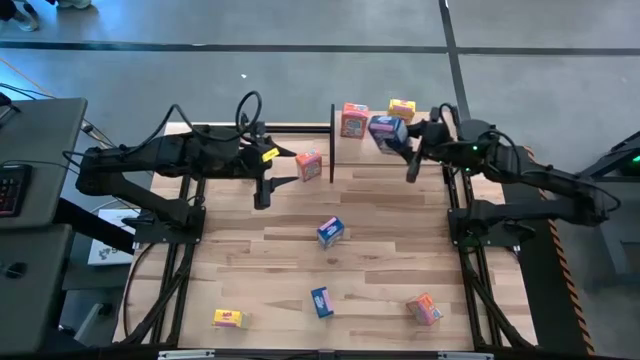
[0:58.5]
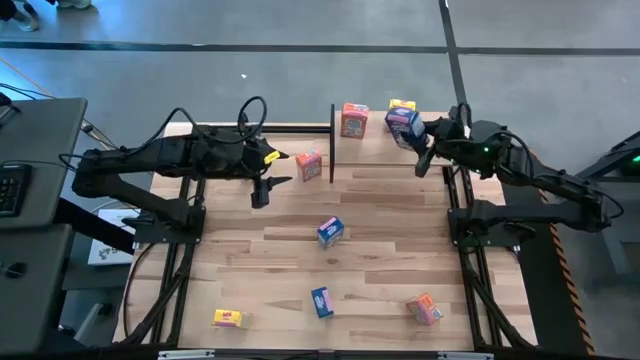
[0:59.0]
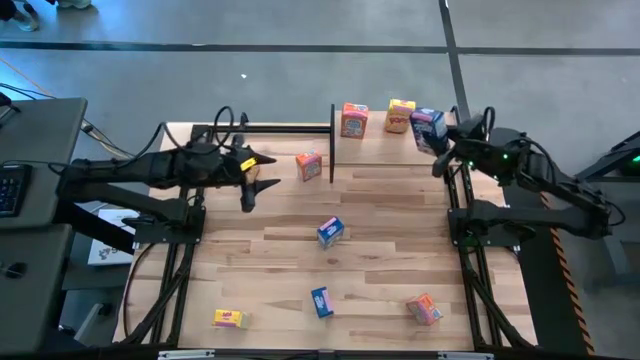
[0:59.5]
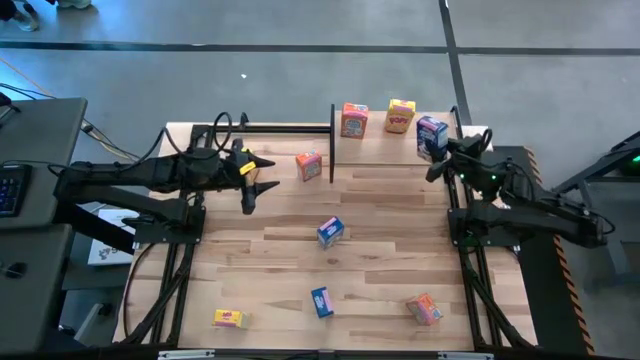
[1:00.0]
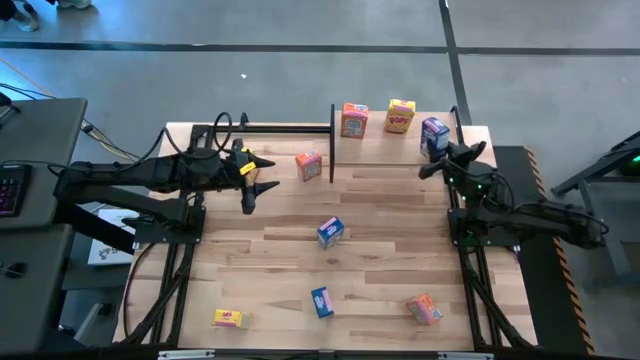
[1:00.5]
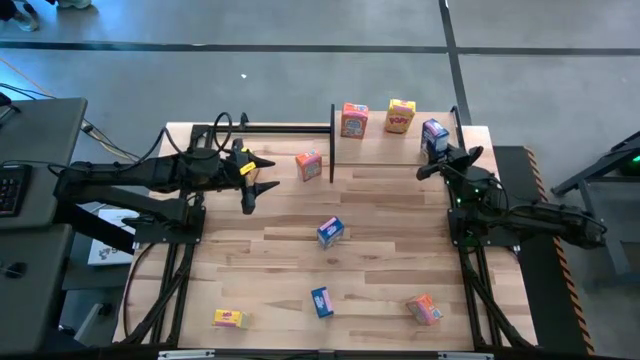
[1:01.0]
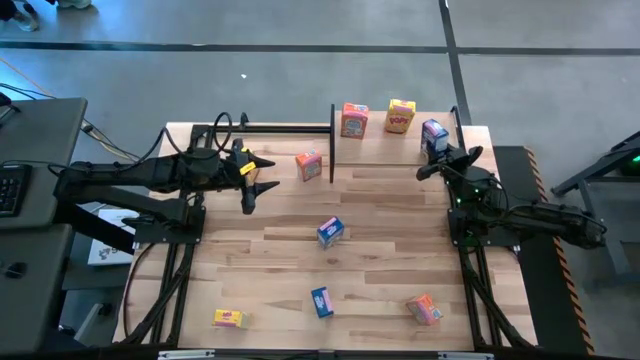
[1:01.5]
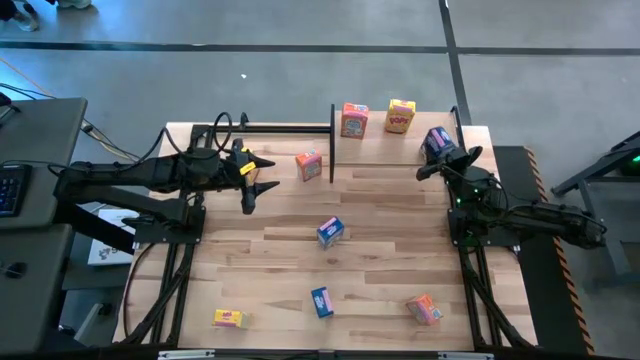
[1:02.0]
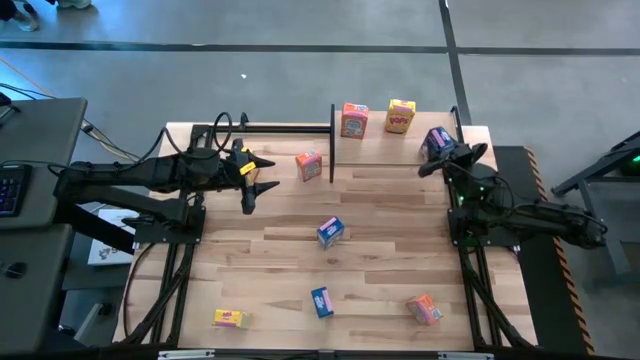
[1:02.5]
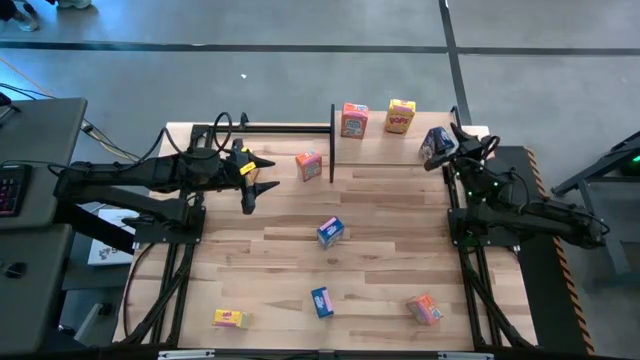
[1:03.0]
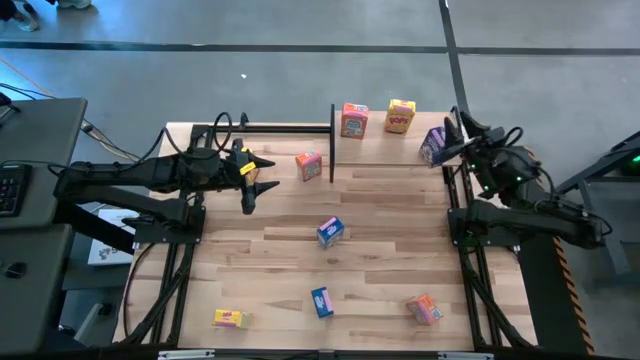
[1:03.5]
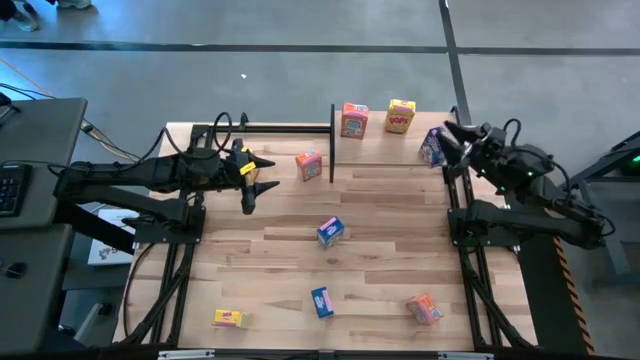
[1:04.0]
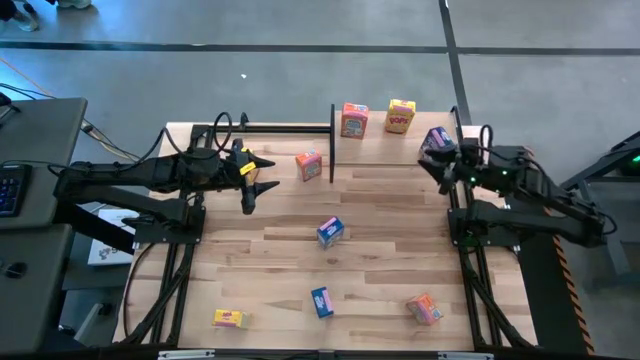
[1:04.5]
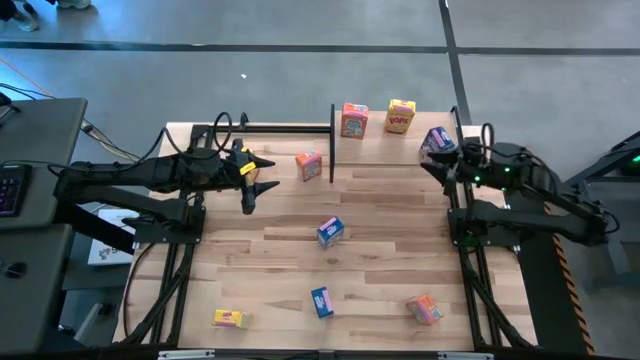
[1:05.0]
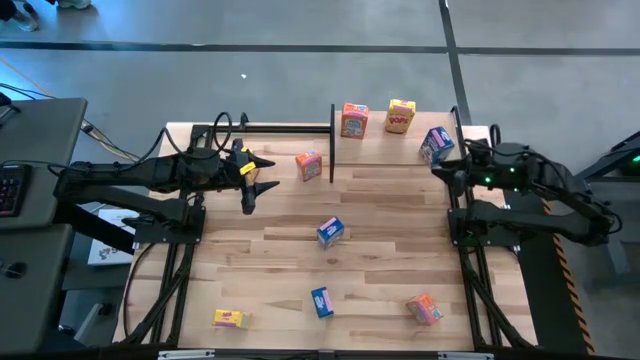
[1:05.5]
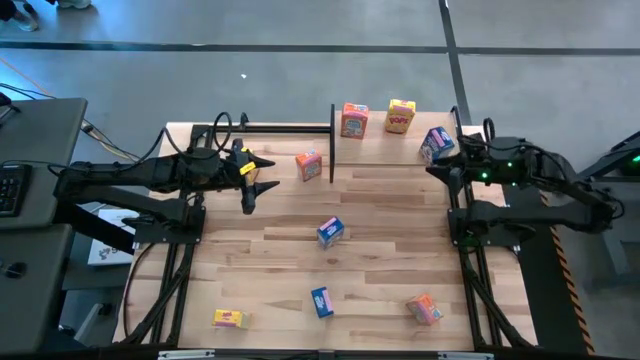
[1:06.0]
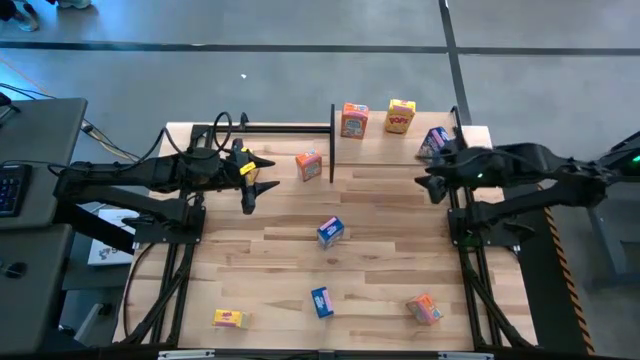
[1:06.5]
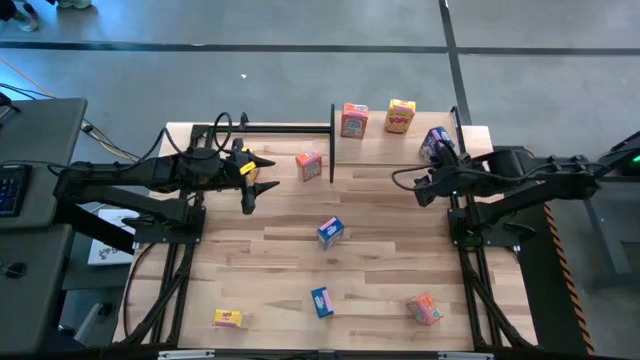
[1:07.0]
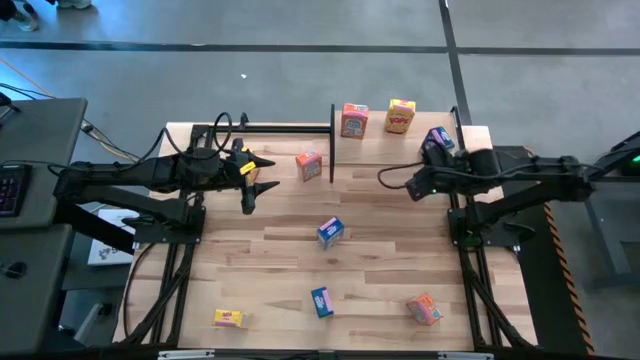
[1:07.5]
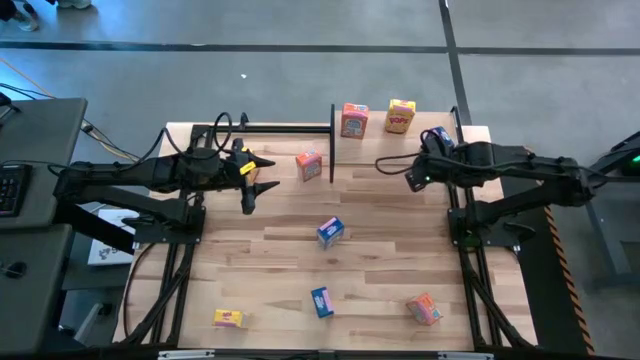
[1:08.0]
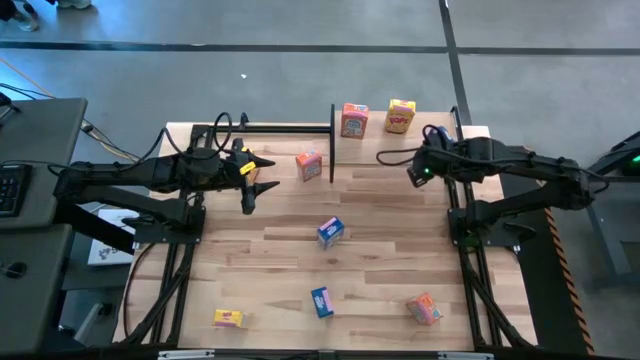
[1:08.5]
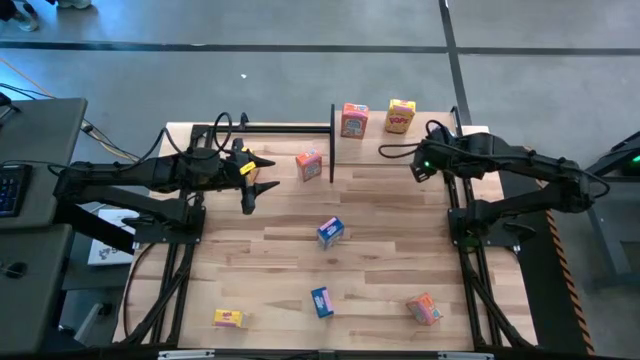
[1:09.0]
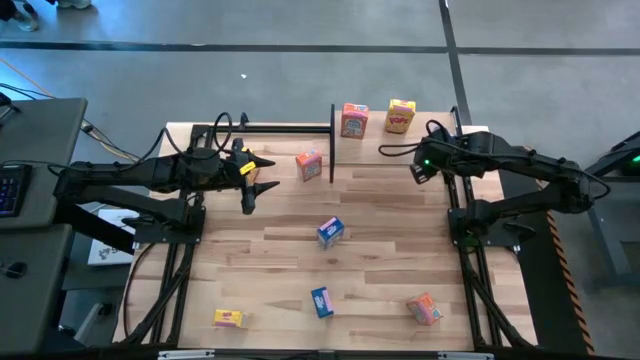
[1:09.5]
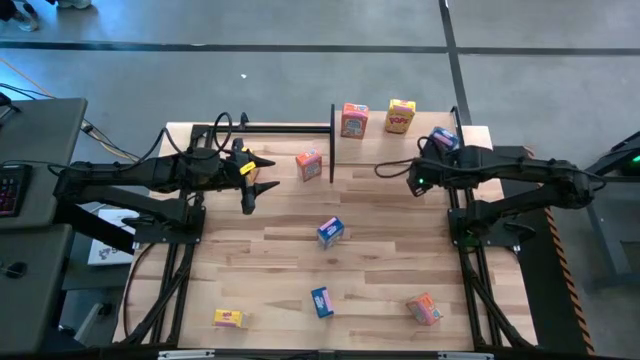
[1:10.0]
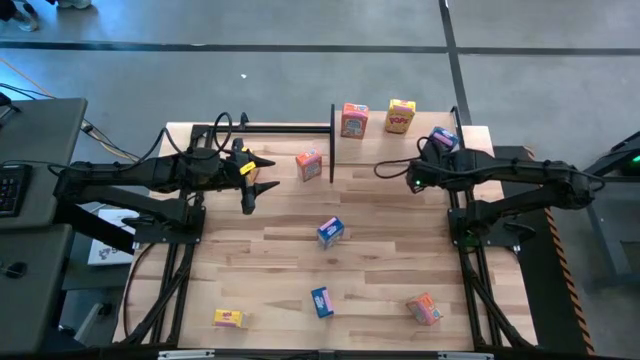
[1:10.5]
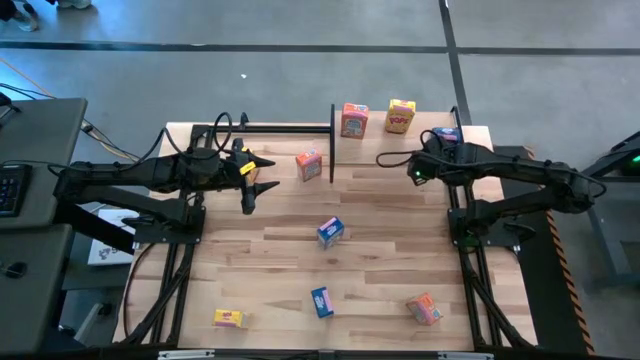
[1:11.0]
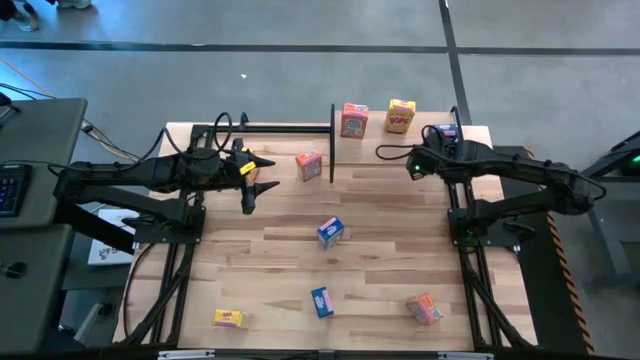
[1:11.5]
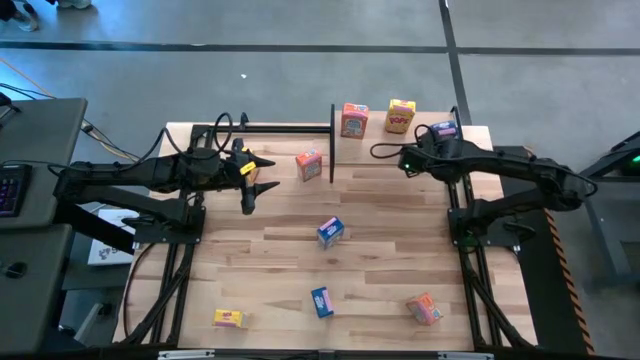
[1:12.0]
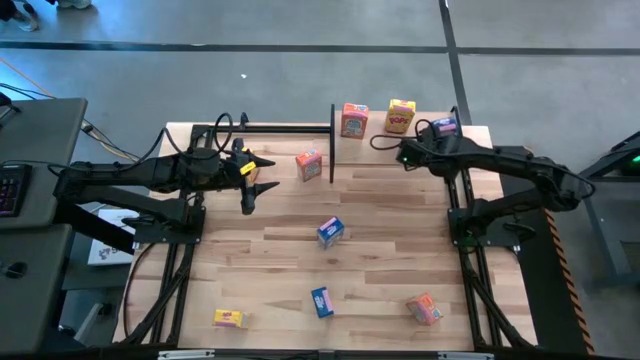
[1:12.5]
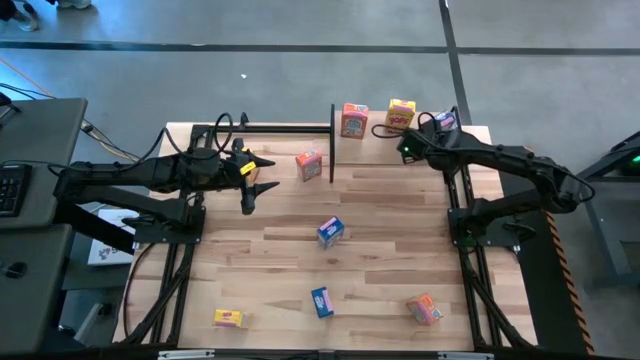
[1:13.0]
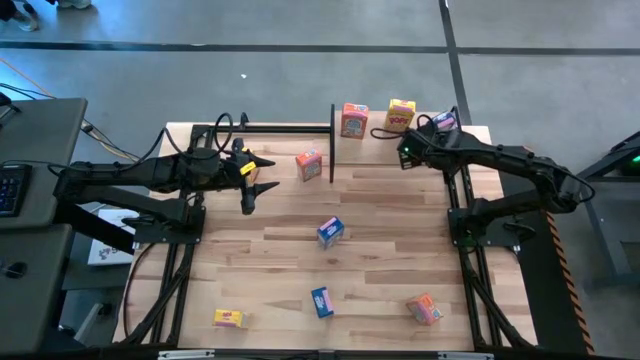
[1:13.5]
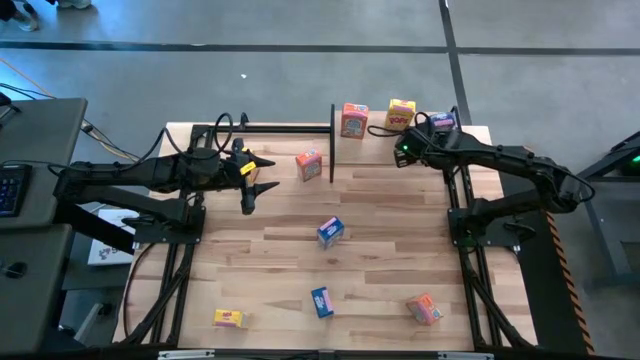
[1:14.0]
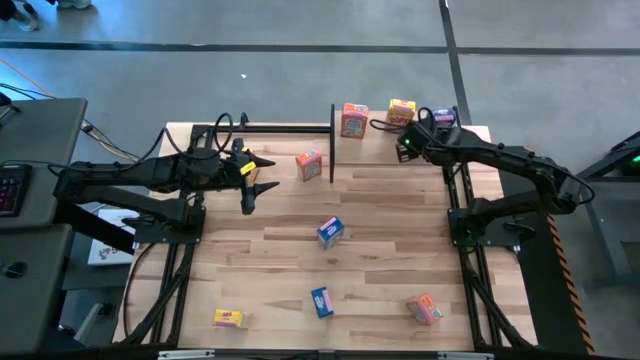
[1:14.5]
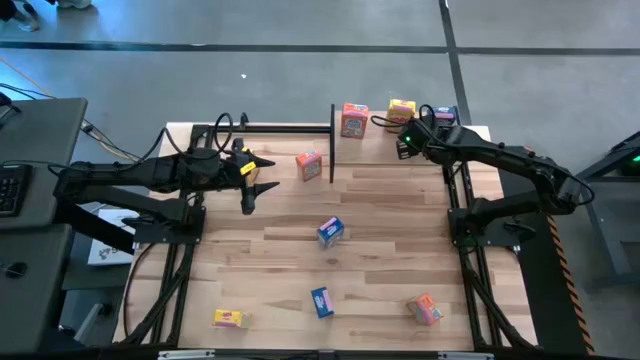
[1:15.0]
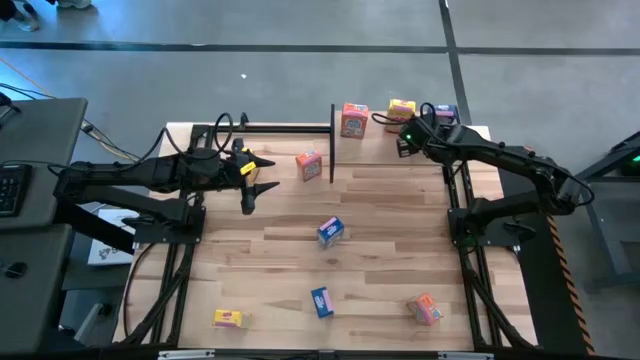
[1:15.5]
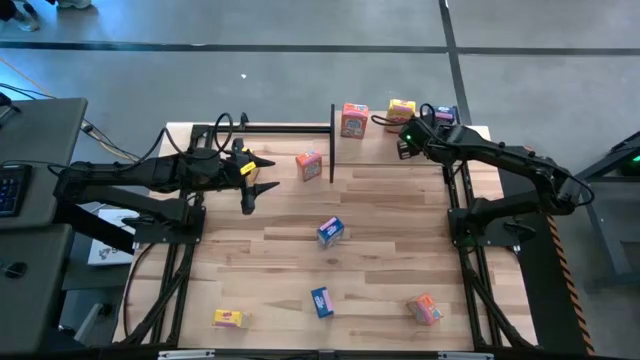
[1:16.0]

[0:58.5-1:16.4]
Task: Stack cereal on shelf
Put the top left blue cereal box on the shelf

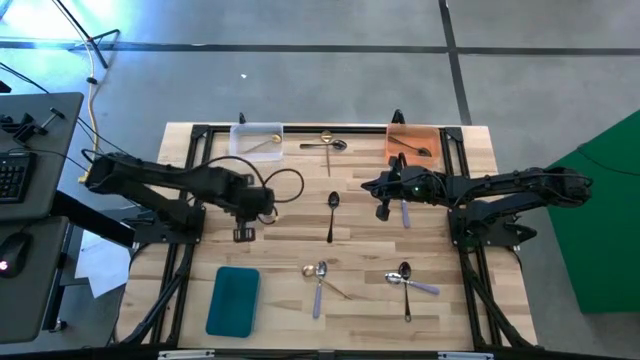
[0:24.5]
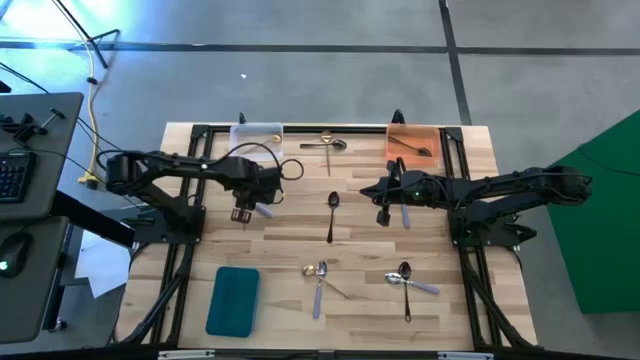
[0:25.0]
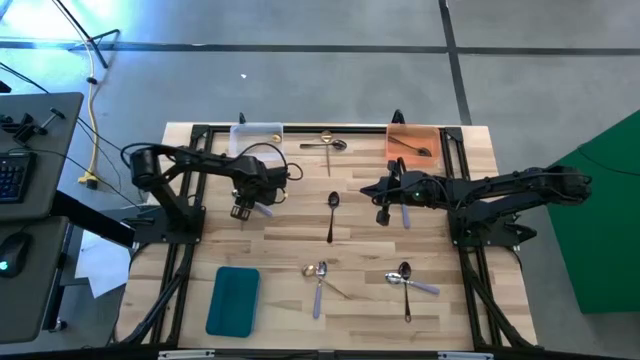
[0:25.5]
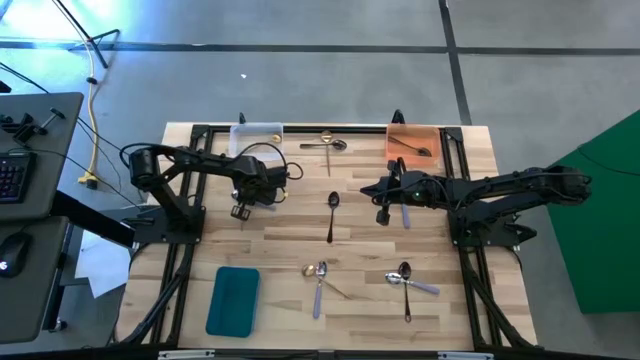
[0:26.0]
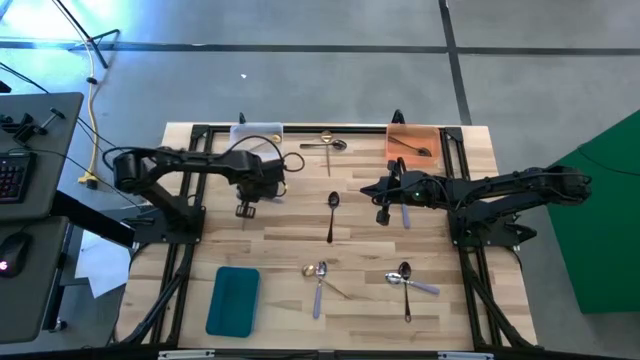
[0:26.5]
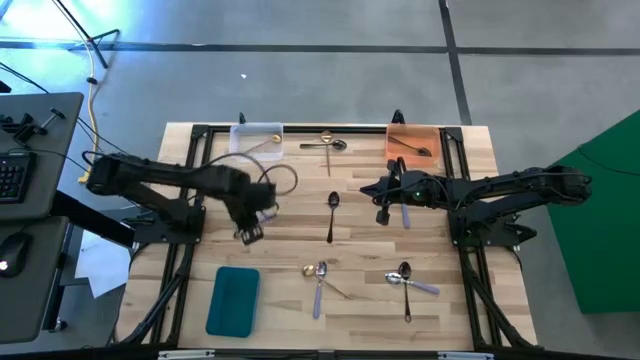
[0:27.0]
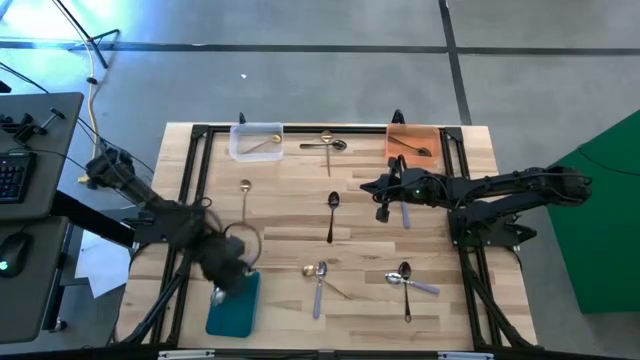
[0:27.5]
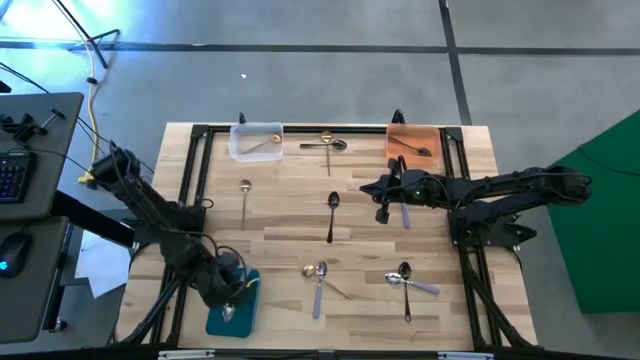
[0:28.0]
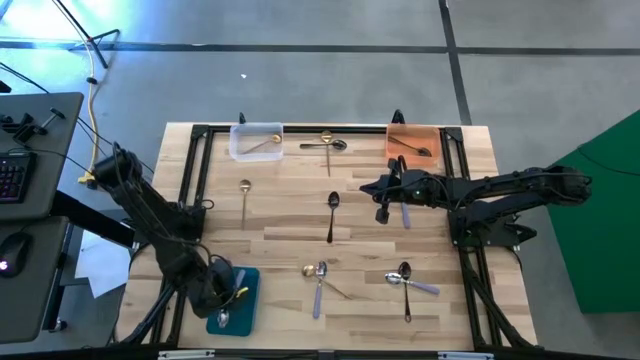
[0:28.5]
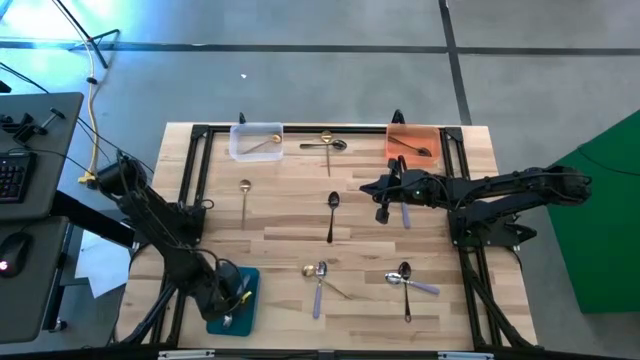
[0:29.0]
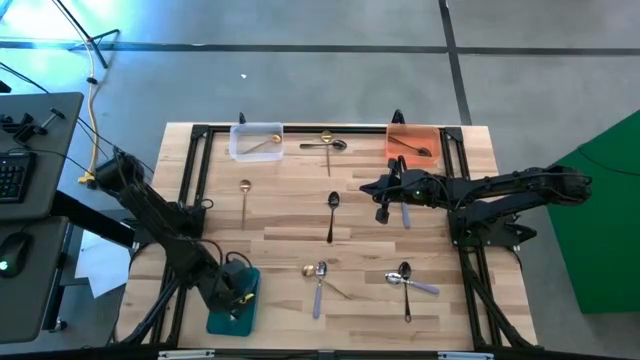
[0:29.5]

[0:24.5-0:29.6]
Task: Sort silverware by color (type)
Put the middle left purple spoon into the blue bin
